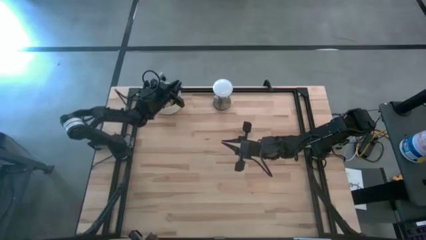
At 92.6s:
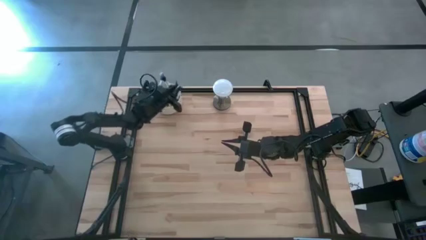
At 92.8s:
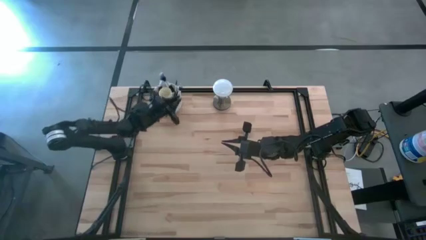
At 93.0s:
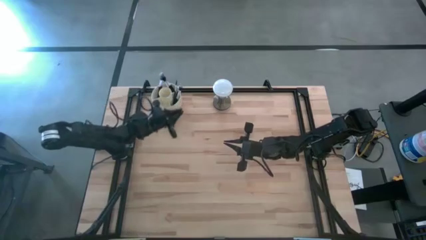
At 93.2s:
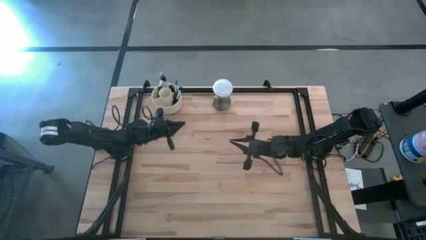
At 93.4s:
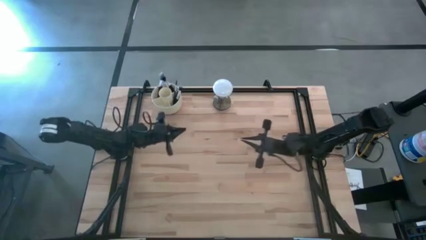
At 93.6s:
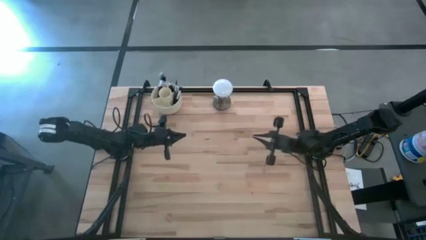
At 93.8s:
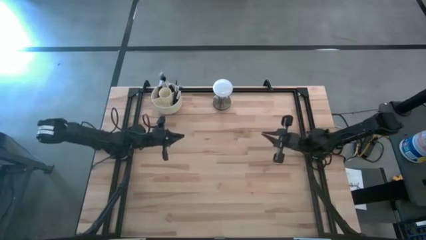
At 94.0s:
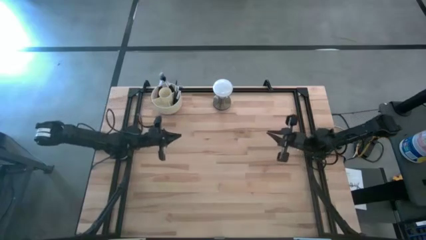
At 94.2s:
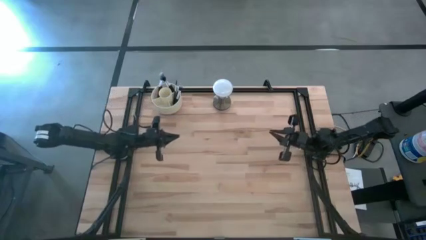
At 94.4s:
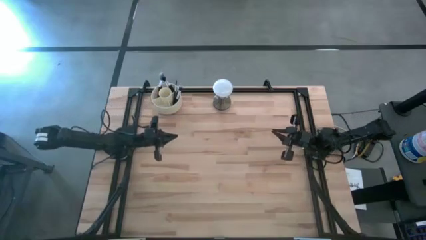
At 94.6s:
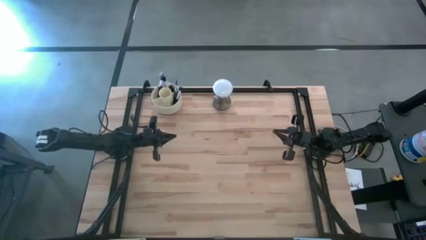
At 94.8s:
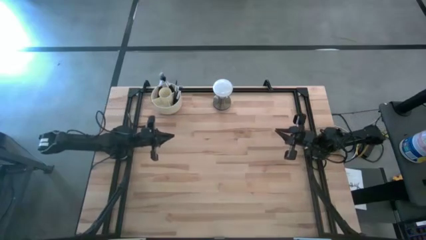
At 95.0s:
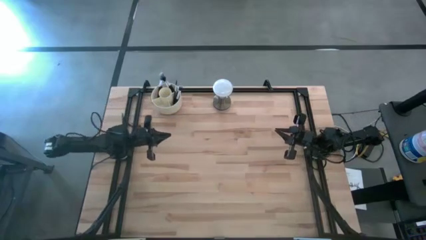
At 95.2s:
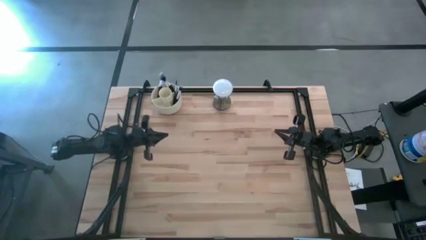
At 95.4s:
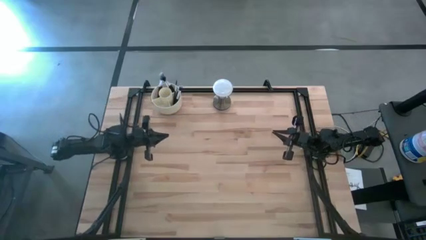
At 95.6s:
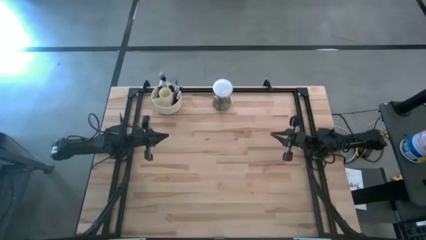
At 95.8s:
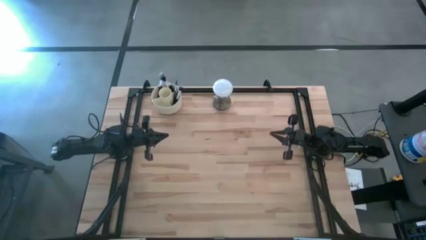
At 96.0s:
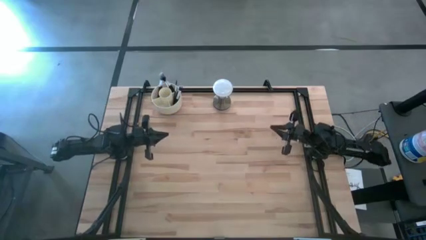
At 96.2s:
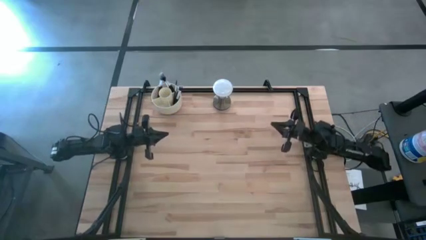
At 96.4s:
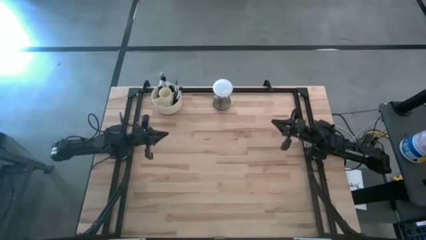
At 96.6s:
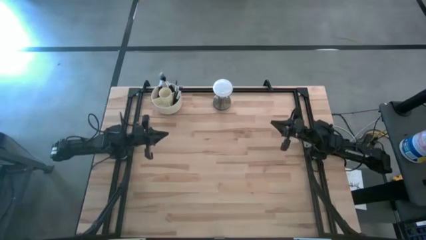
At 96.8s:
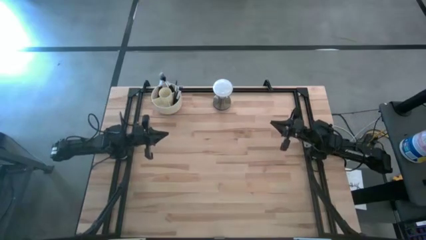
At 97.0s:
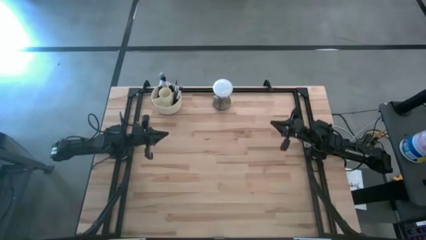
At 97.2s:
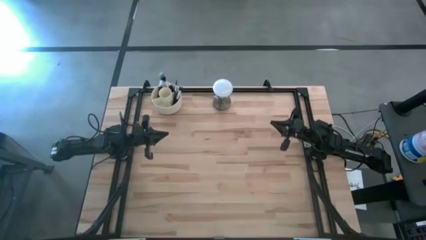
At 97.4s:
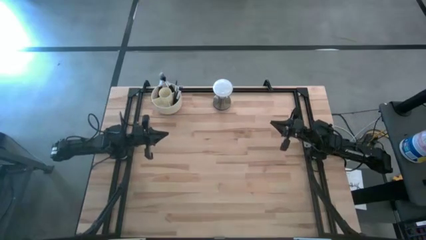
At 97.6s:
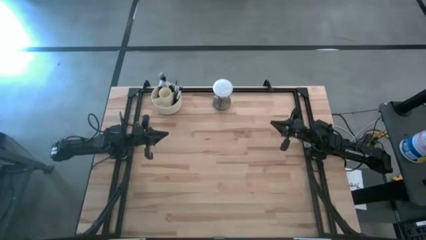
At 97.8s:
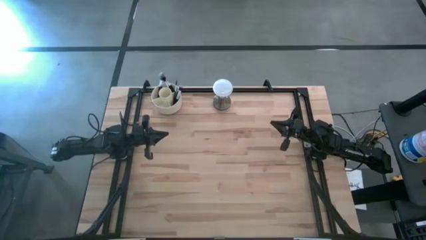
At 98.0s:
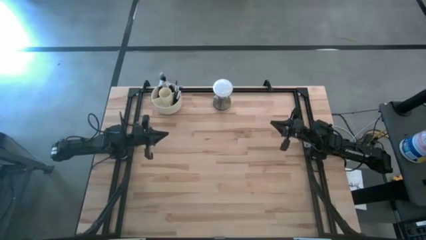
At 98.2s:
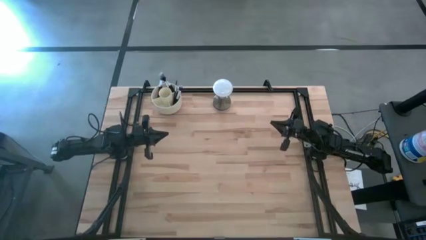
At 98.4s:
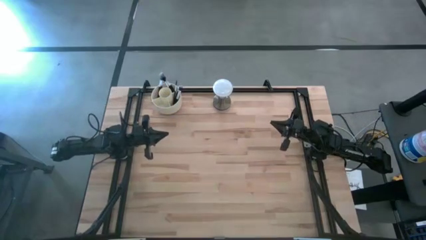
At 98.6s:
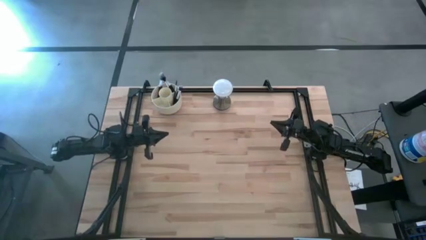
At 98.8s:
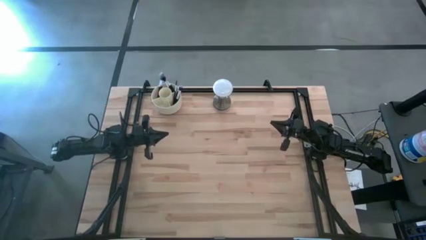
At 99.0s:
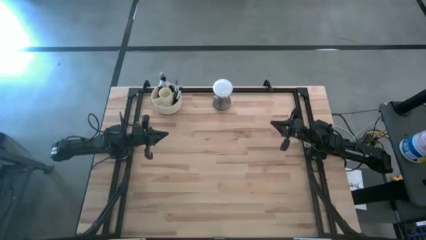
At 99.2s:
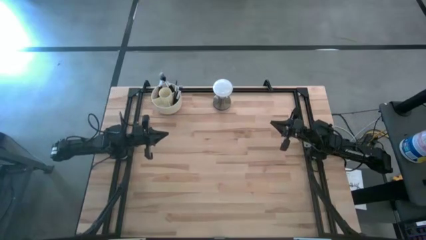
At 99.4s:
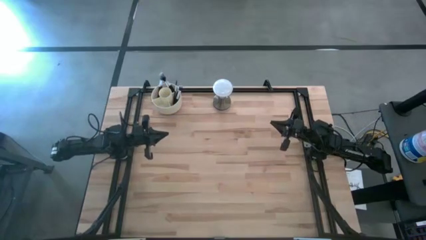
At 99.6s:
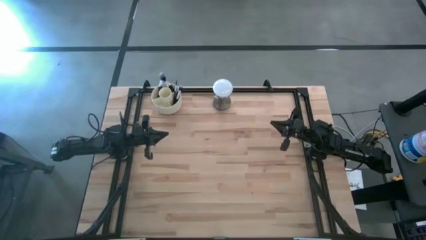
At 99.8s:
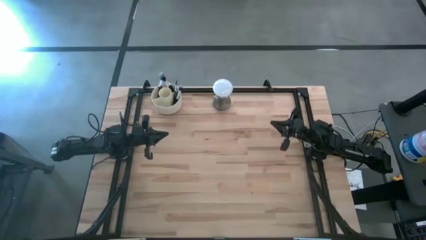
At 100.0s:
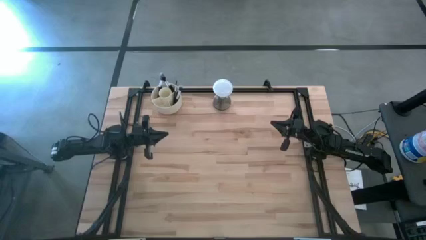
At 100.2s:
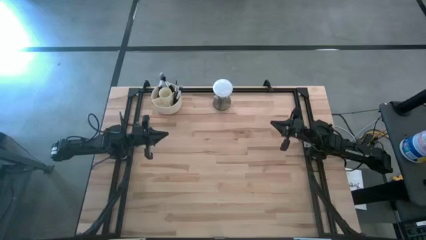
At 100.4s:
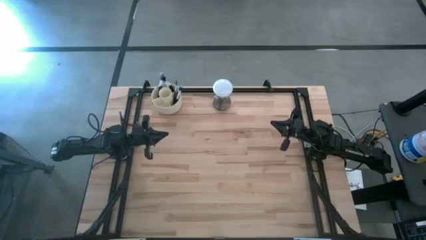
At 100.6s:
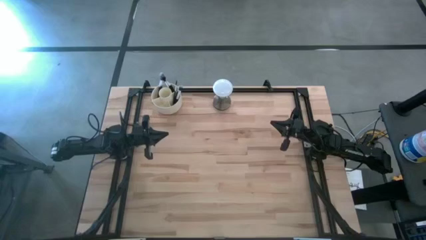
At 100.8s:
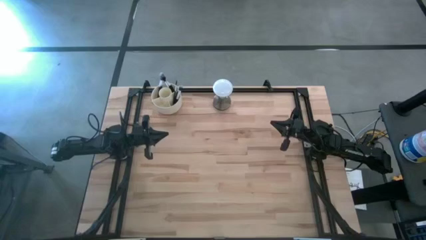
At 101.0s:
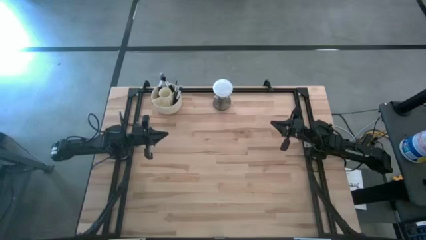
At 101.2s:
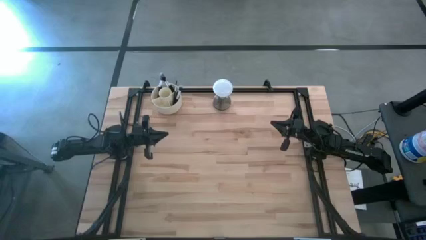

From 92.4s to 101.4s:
Task: Put items in baskets/containers
Return to Home Position

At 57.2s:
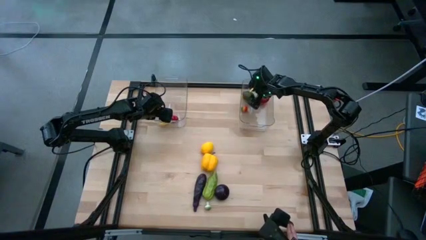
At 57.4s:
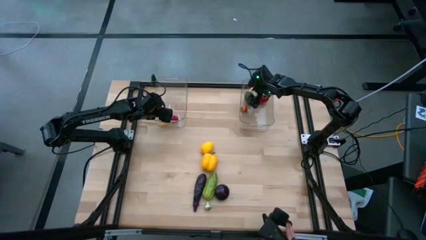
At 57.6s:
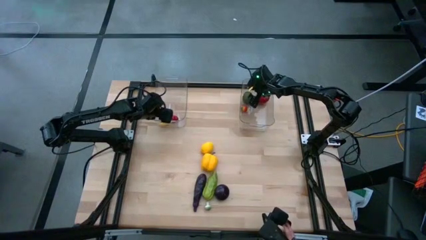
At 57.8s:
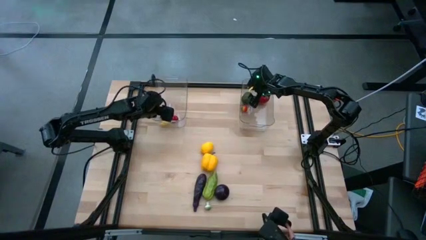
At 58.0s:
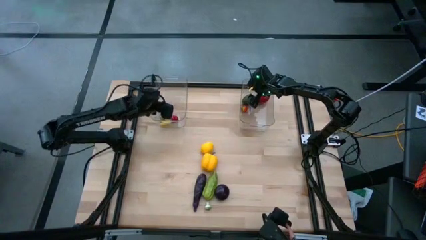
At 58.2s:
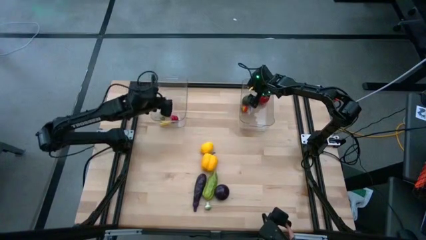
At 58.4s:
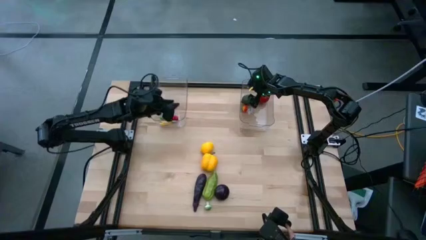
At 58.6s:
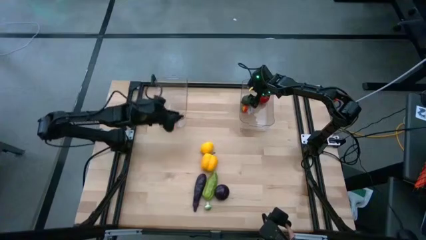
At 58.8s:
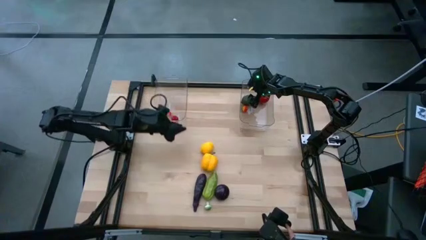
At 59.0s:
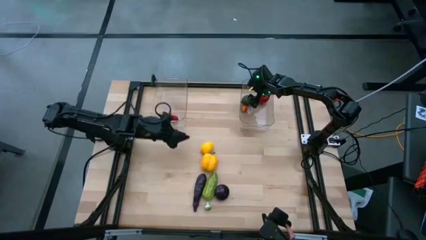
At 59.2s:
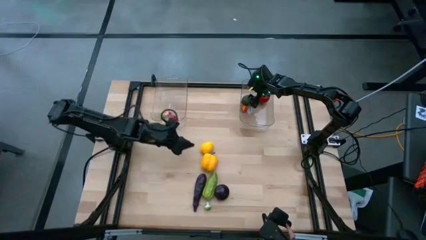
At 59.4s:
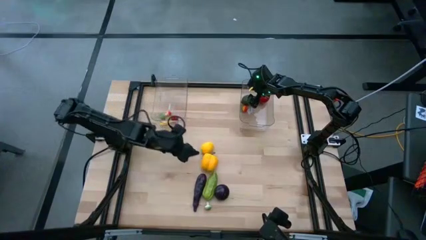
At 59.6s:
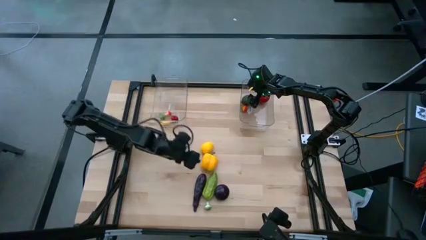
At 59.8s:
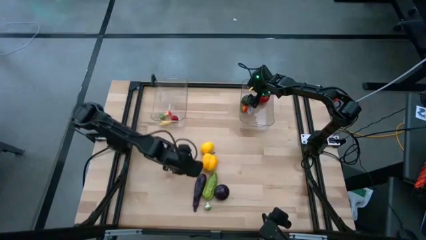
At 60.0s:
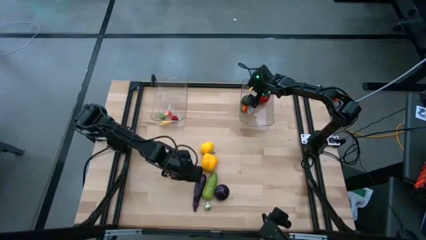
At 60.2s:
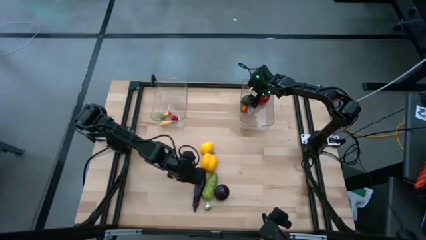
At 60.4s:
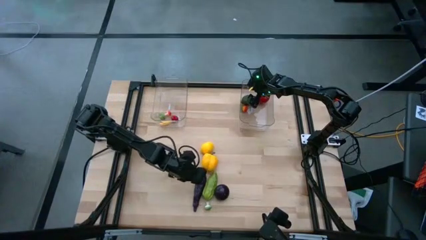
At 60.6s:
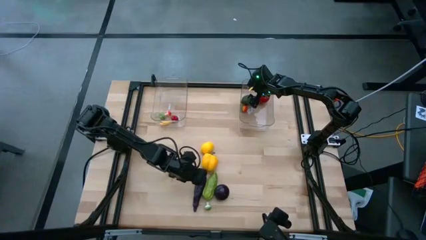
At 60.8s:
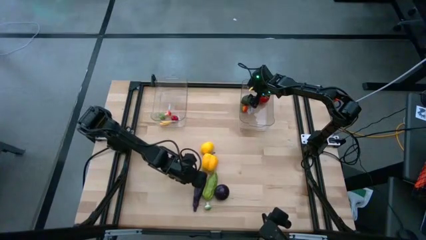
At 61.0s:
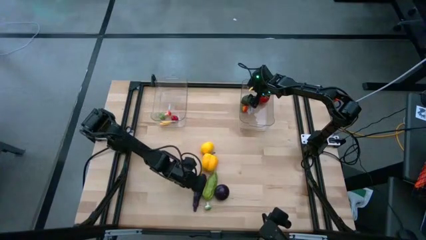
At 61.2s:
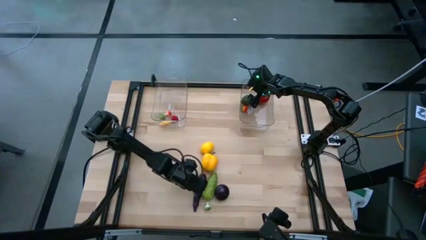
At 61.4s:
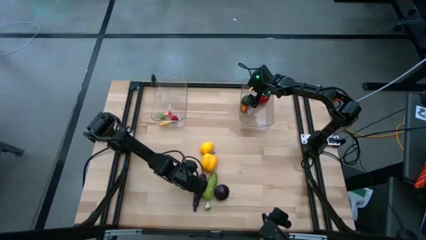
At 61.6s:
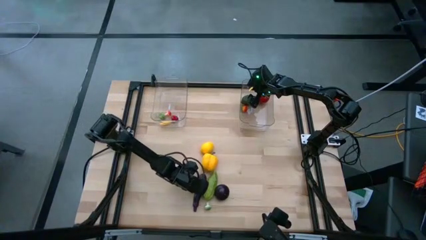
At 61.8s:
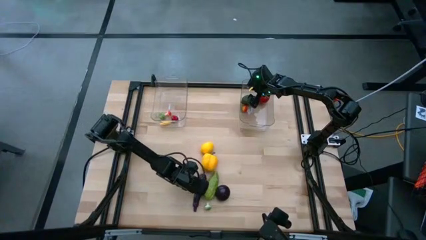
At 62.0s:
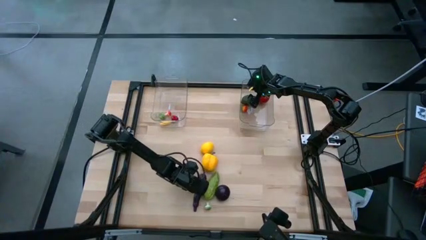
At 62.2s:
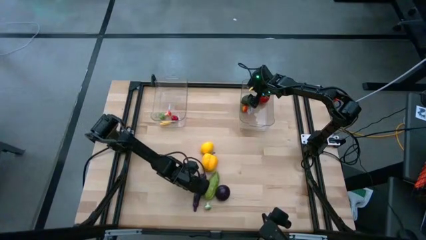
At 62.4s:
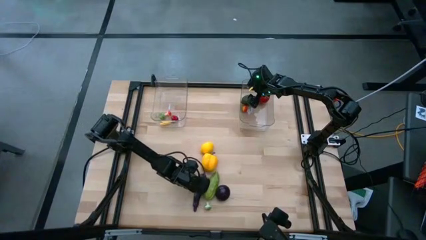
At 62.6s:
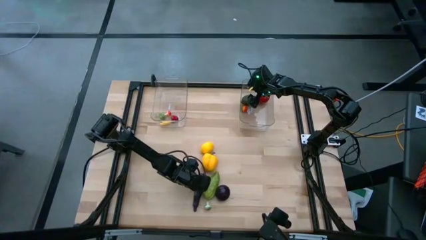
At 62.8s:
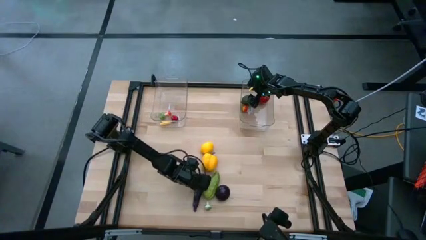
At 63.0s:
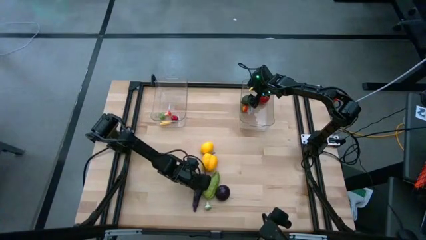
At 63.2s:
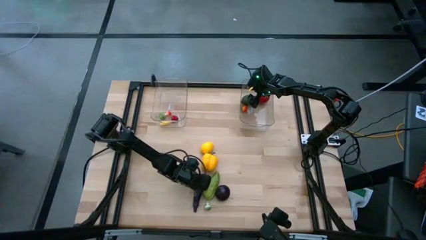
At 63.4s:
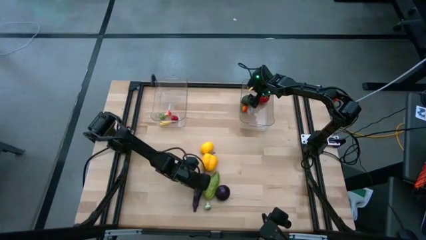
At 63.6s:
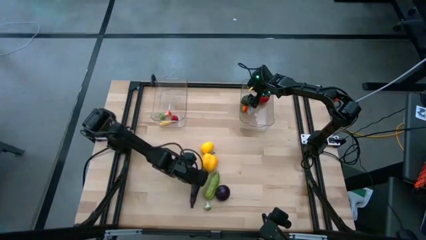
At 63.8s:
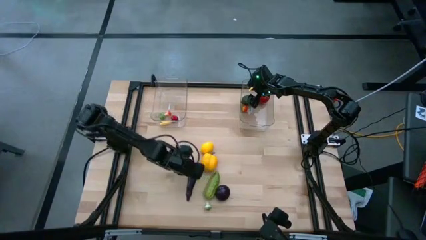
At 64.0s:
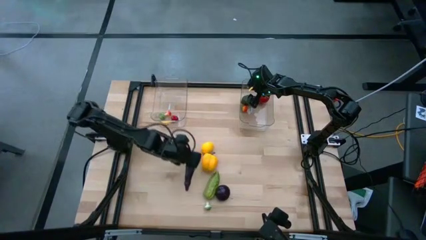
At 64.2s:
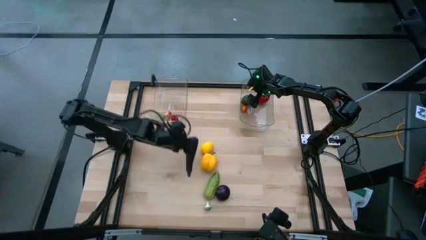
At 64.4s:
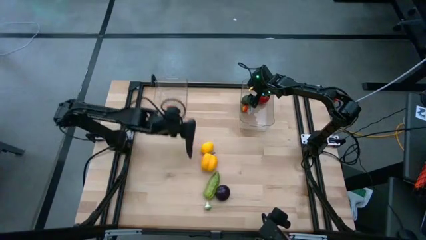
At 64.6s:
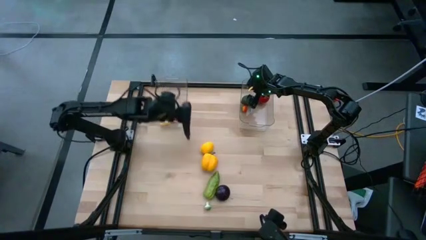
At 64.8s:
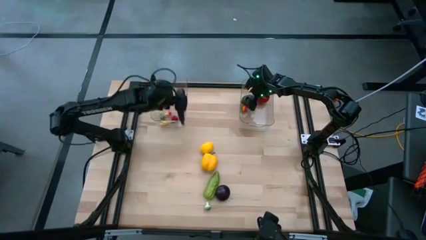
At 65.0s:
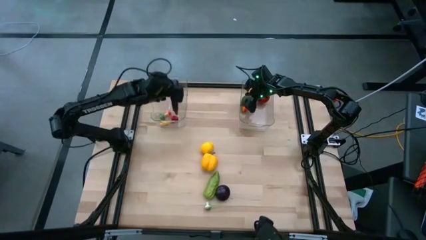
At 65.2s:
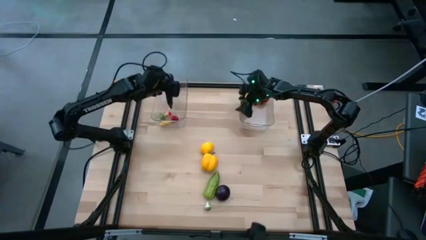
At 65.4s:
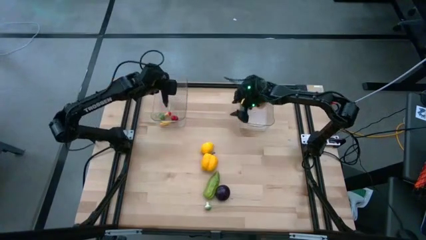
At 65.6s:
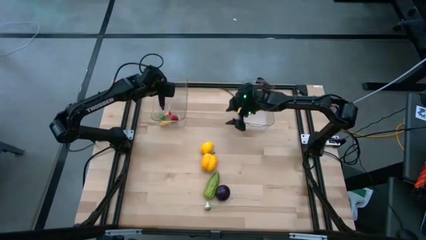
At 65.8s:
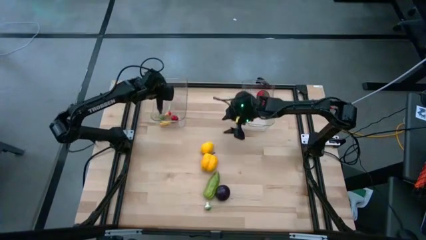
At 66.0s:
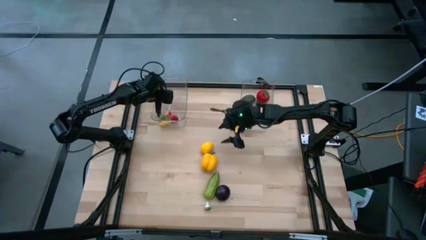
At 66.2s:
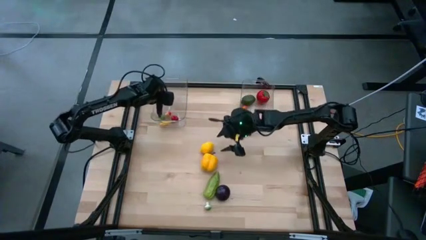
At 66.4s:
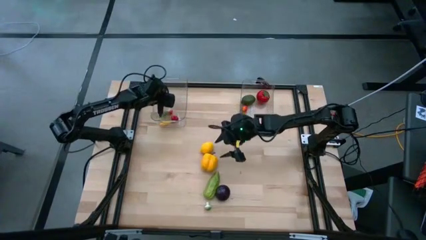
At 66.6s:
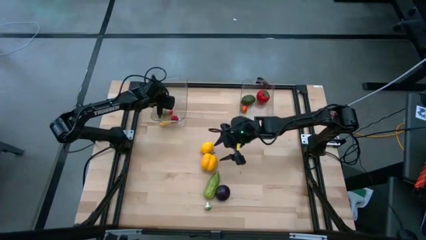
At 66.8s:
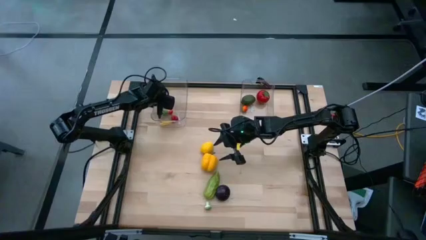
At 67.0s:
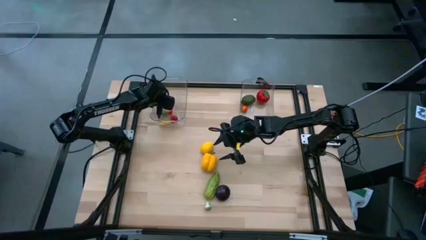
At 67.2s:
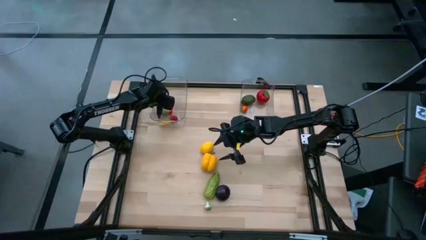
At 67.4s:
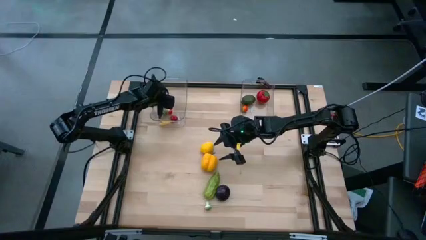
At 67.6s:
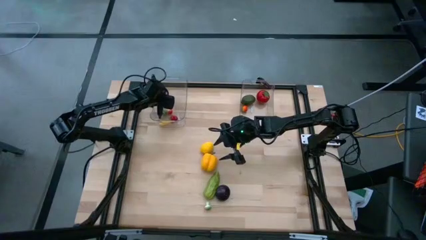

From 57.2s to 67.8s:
Task: Sort produce into baskets
Put the violet eggplant into the left transparent bin
